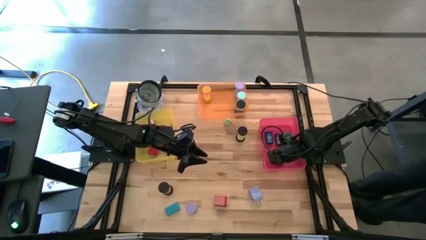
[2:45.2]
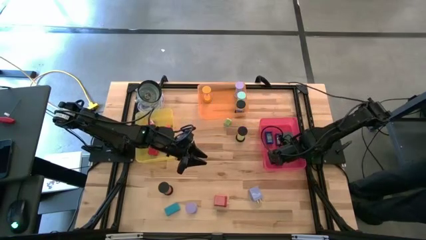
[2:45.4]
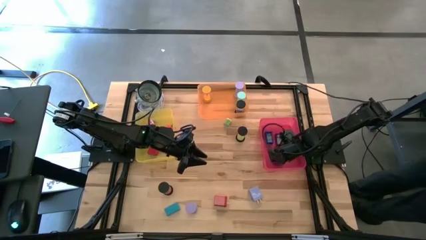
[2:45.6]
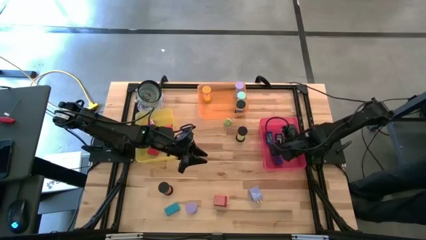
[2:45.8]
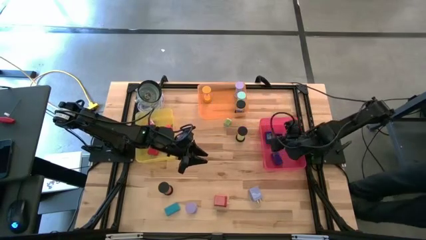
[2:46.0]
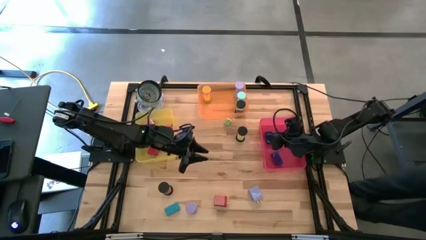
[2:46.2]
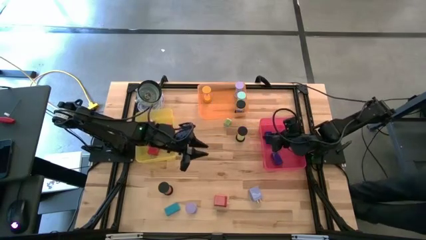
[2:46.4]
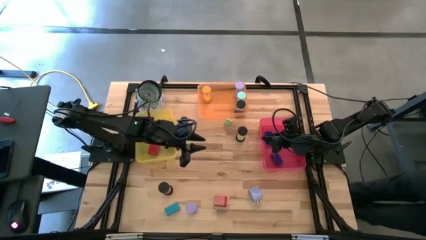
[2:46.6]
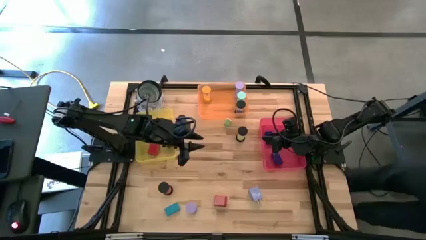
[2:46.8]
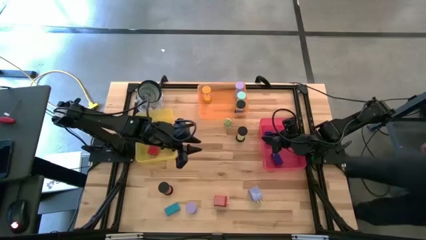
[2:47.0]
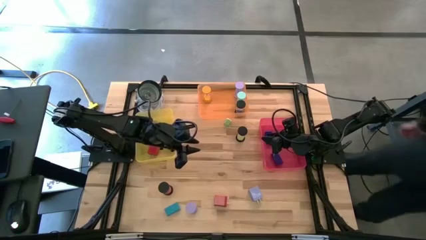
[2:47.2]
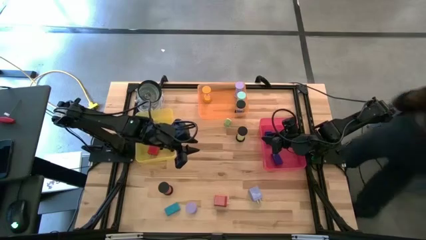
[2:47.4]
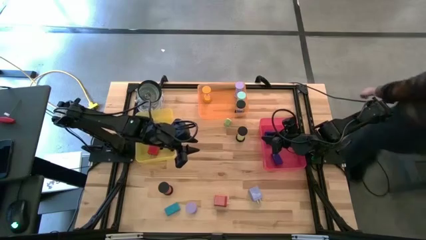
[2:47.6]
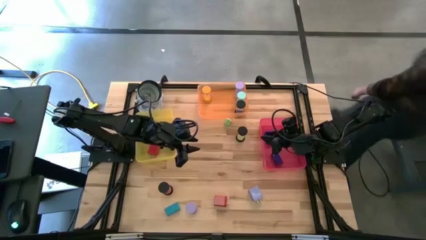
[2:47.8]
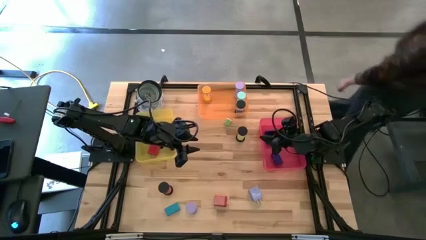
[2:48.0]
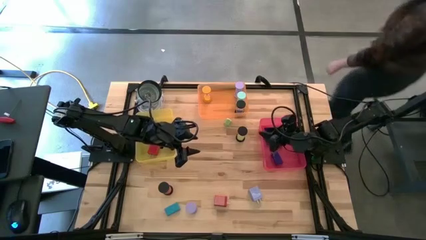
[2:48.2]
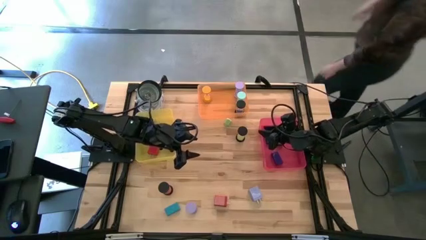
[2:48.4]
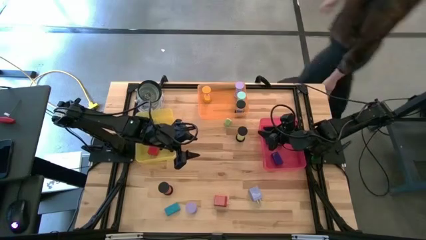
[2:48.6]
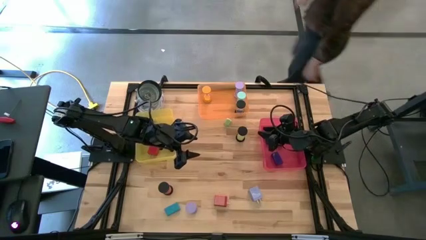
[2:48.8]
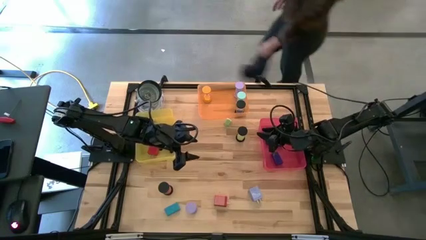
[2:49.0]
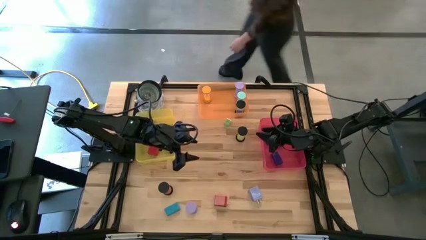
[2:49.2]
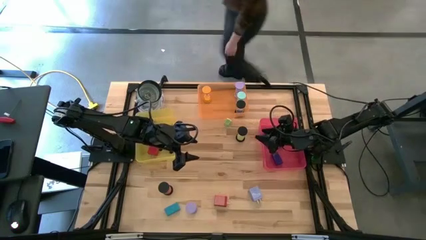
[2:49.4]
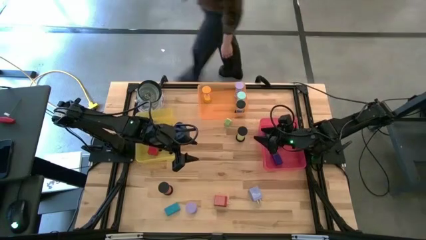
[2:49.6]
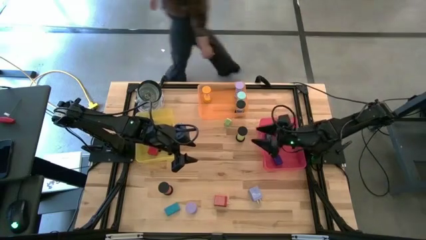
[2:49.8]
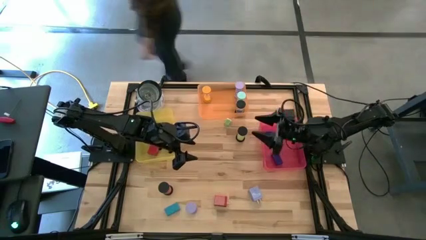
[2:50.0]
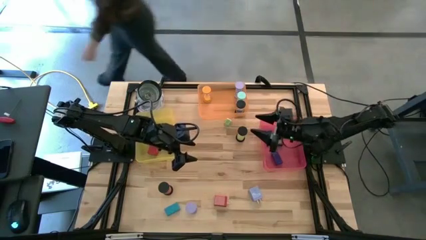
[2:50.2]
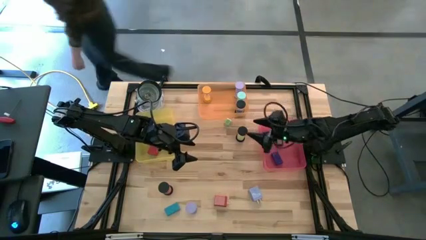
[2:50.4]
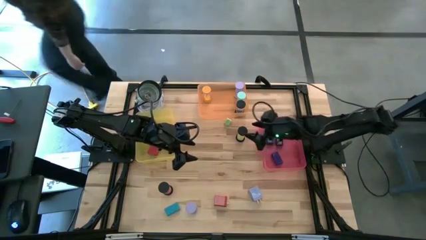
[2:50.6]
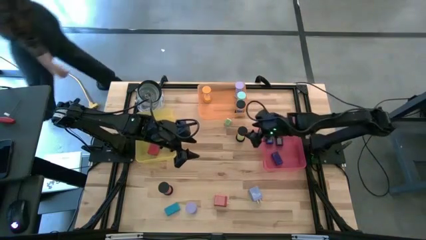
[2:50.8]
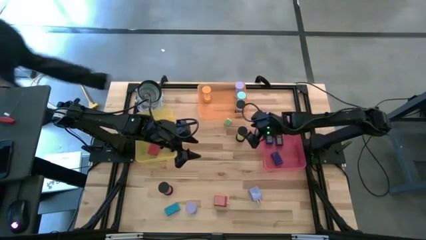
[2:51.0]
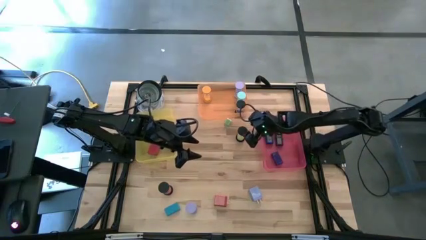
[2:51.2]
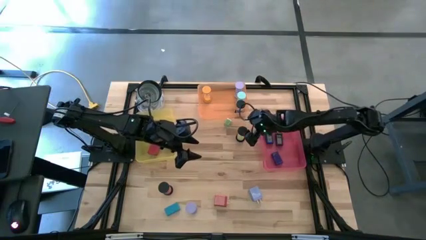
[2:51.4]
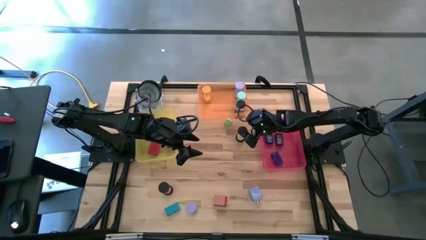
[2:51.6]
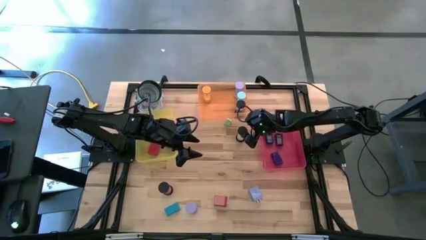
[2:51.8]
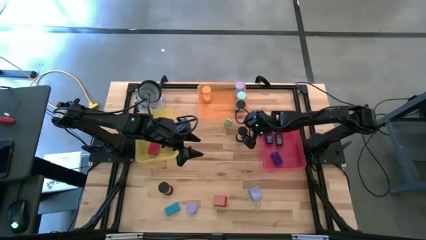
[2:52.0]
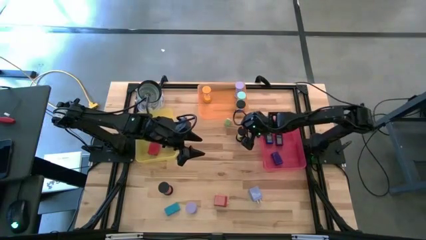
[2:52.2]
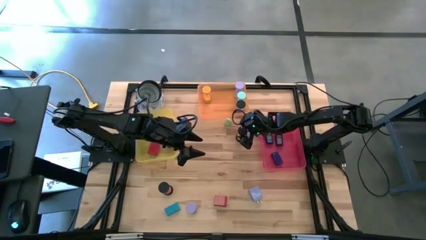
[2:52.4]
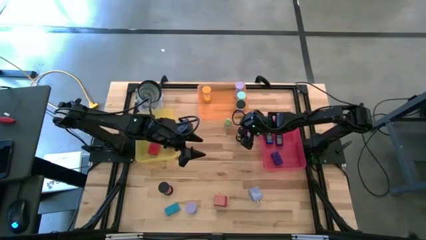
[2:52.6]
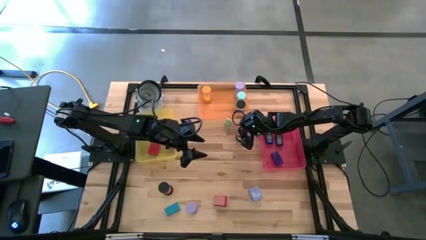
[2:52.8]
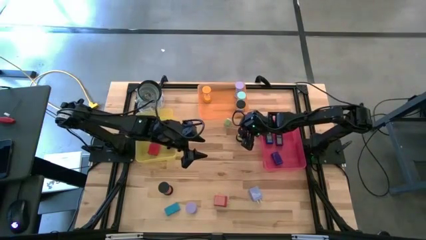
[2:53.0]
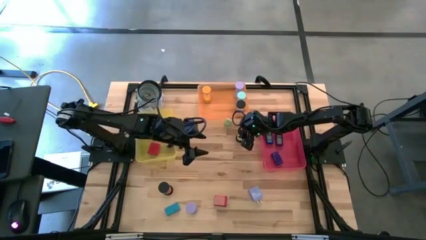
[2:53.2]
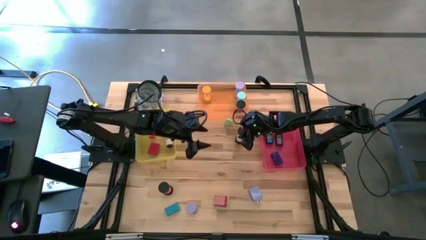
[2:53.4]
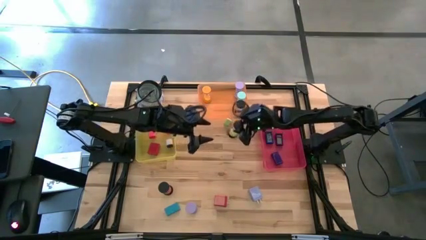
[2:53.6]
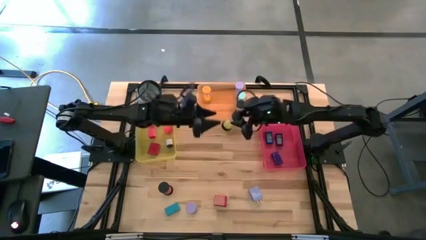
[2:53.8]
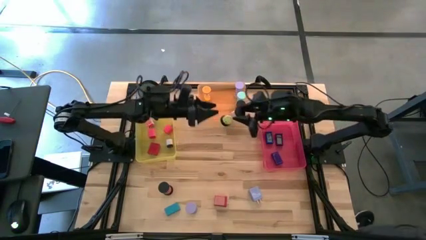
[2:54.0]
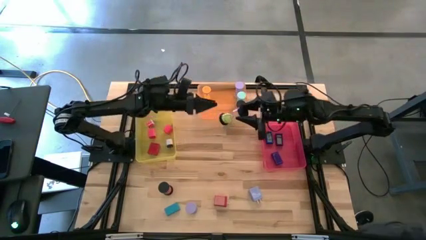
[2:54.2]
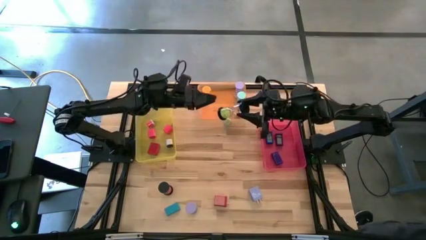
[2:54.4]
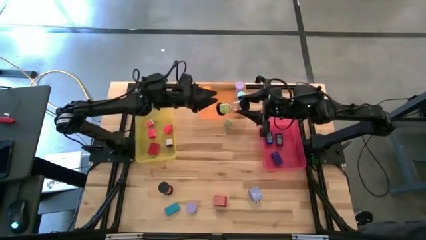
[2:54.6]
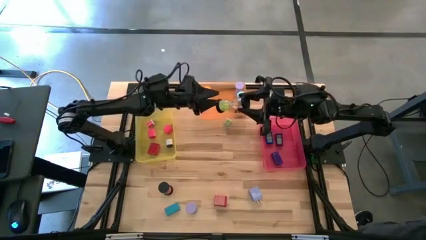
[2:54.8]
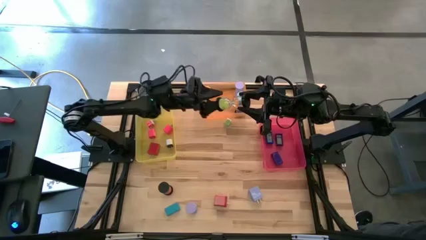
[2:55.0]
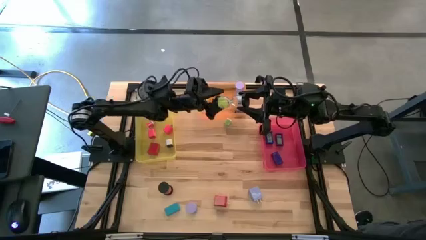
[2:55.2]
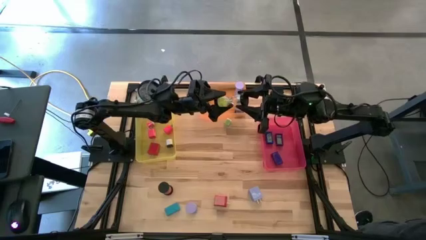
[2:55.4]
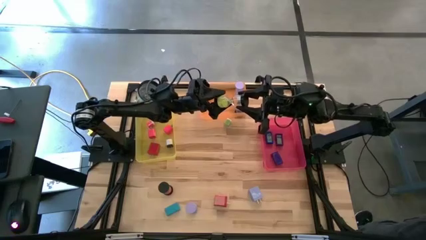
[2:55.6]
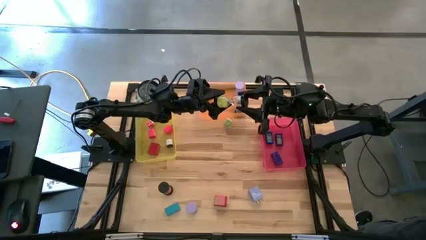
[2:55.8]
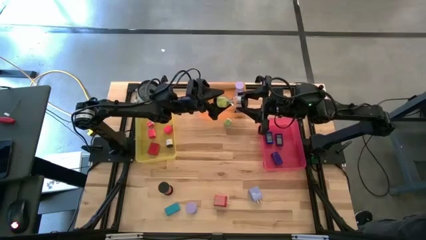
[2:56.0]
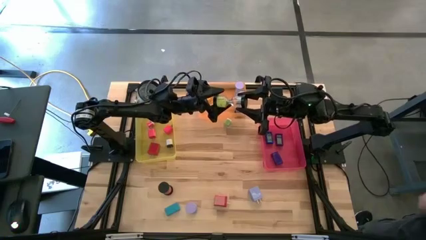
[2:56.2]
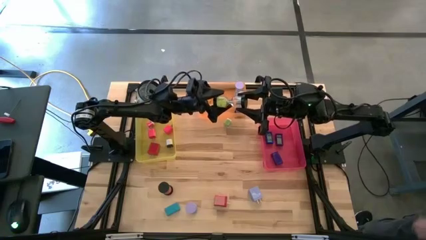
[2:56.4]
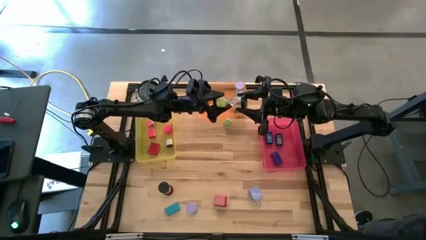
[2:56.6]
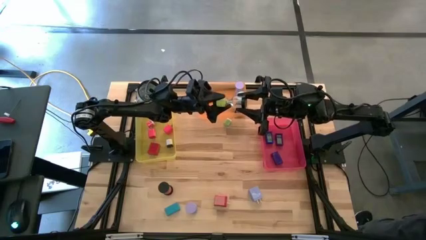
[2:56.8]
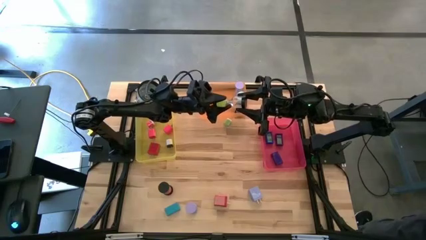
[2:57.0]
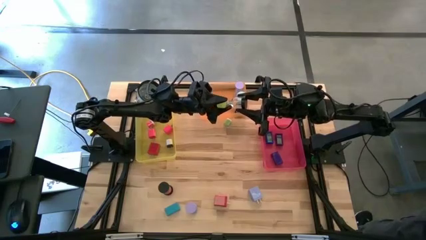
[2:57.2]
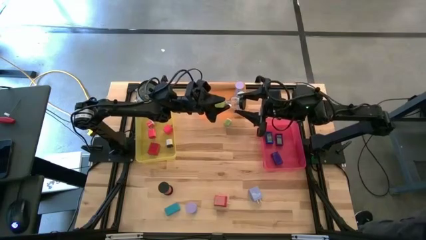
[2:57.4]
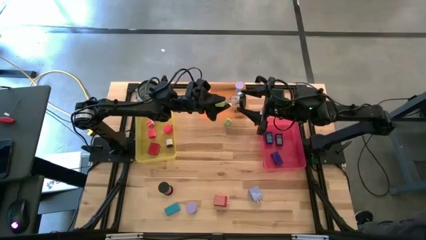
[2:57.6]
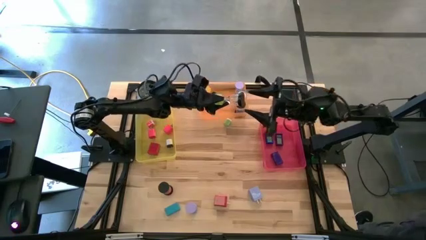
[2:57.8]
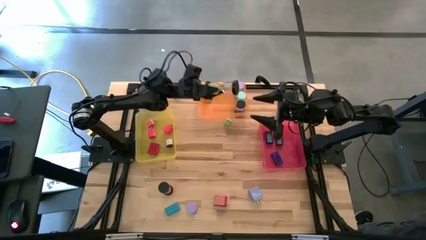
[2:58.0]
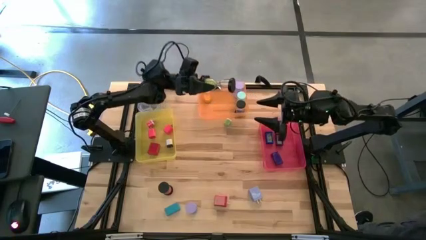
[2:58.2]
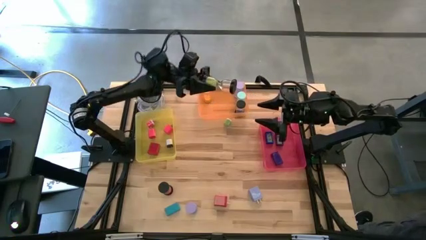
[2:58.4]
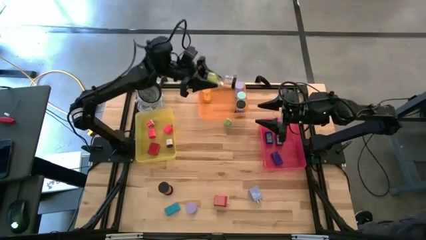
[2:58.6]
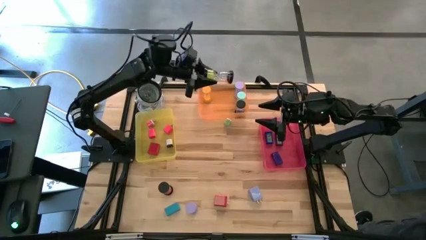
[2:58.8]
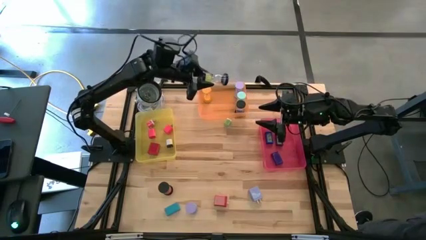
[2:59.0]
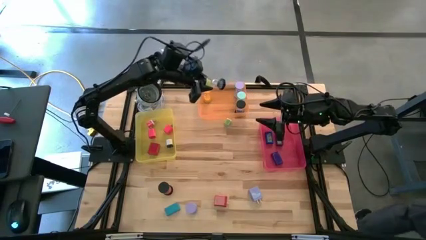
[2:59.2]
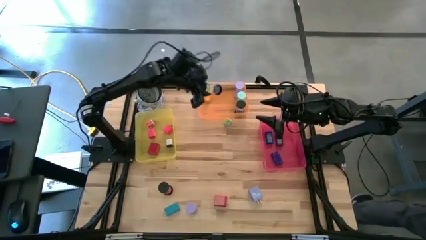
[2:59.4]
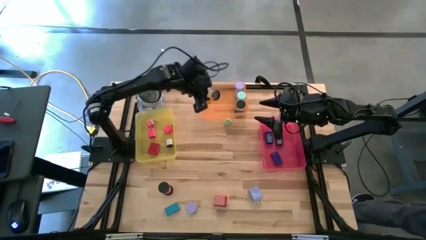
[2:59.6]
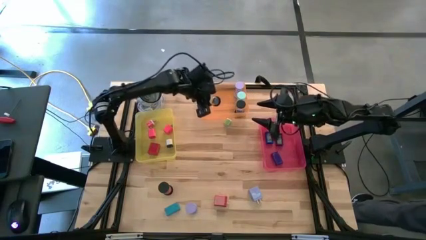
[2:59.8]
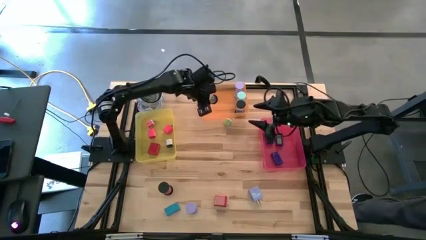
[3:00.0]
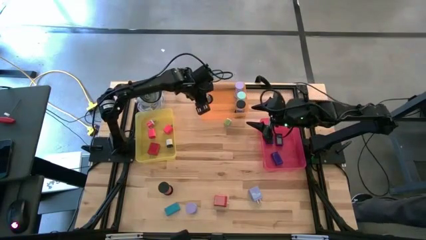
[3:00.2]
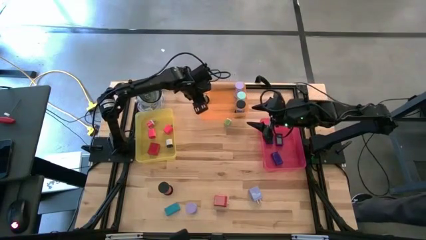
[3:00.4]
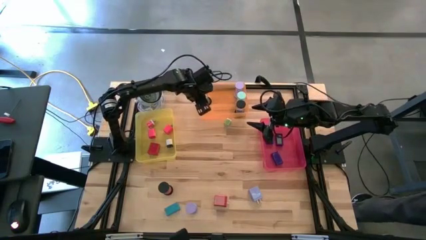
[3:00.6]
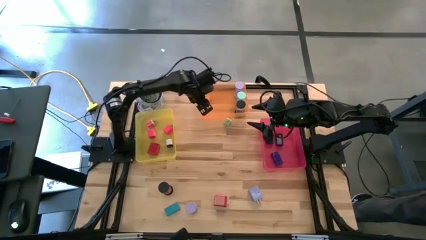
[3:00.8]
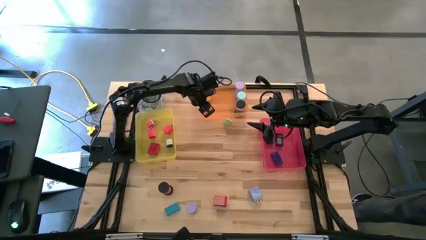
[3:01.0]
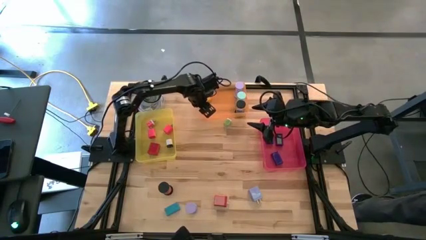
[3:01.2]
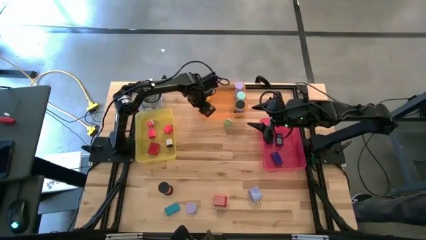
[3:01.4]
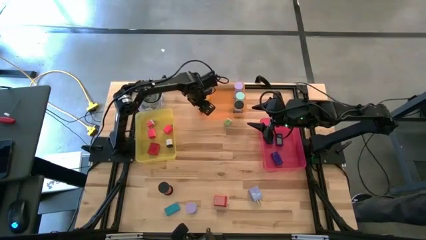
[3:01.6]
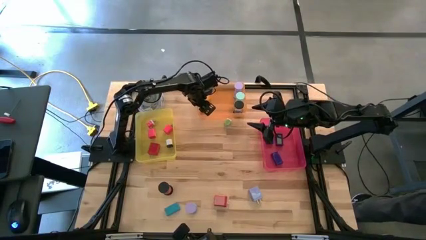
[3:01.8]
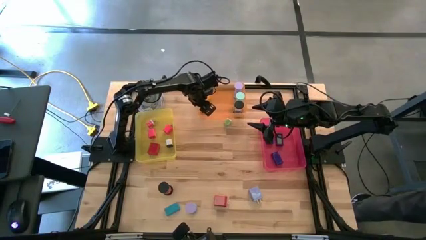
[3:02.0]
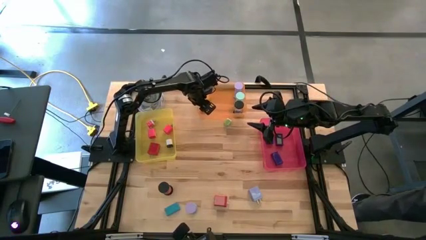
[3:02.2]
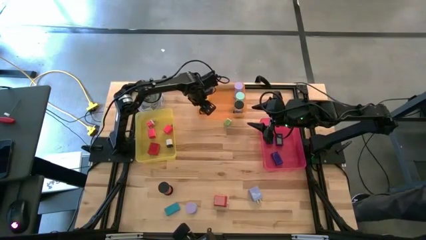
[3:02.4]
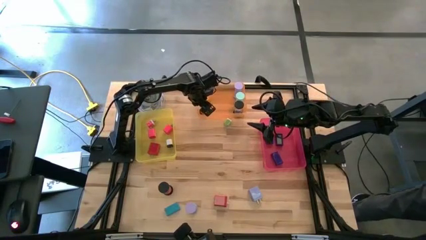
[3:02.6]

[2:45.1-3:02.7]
Task: Pick & Place Office items
Put the black hourglass in the orange bin

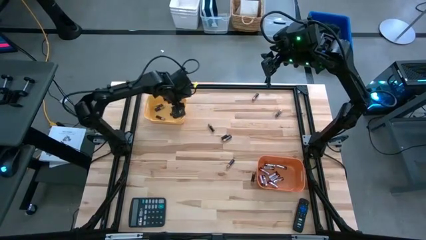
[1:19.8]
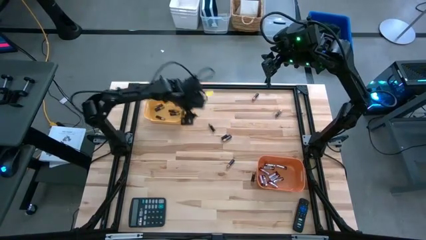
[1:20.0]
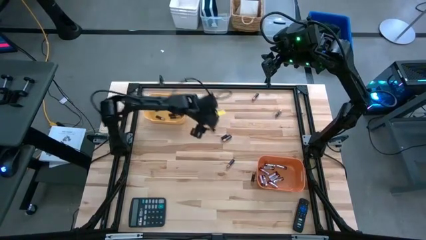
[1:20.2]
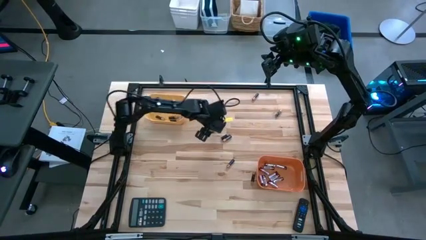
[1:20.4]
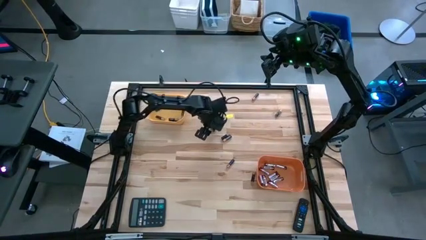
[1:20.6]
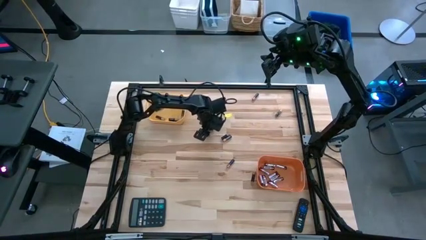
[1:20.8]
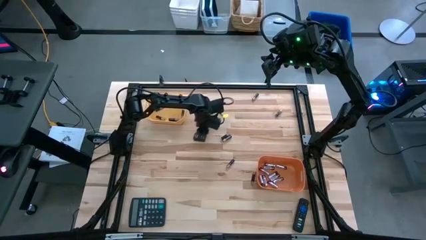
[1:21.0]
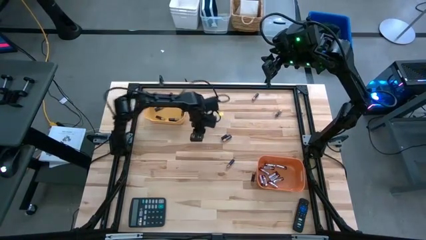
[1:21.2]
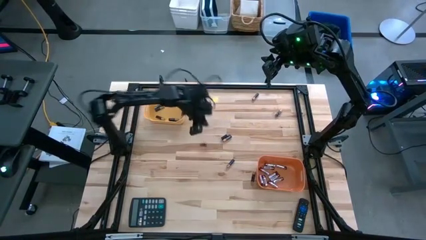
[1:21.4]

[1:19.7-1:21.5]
Task: Sort batteries
Put the black battery into the yellow bin
